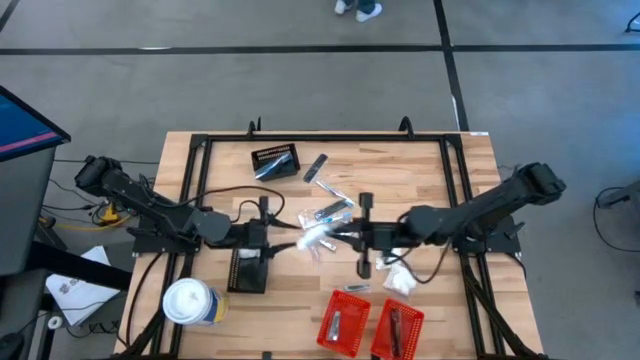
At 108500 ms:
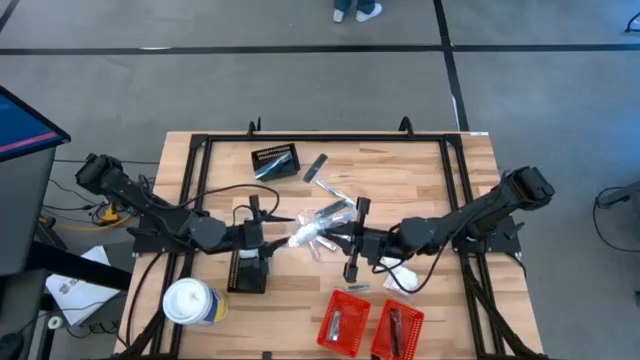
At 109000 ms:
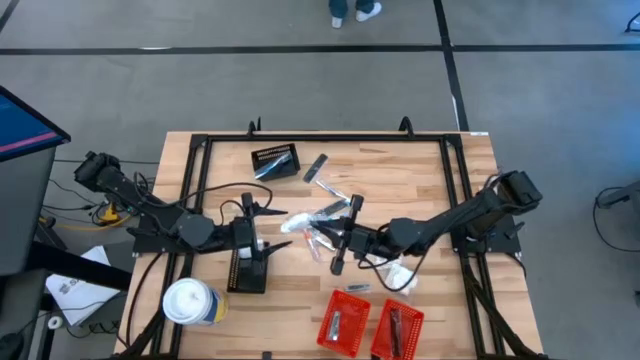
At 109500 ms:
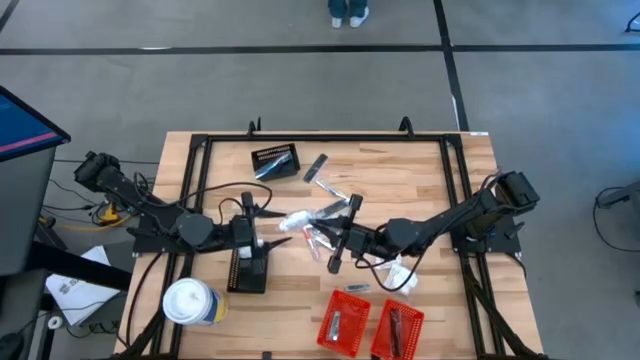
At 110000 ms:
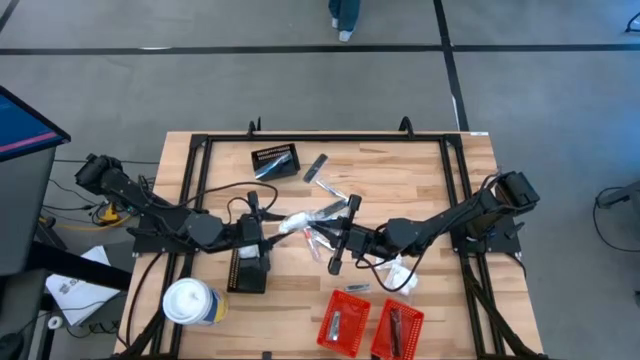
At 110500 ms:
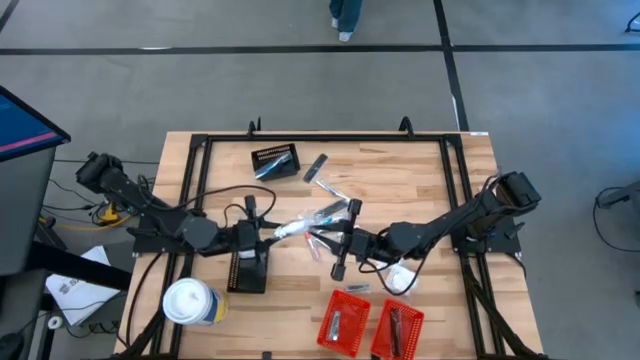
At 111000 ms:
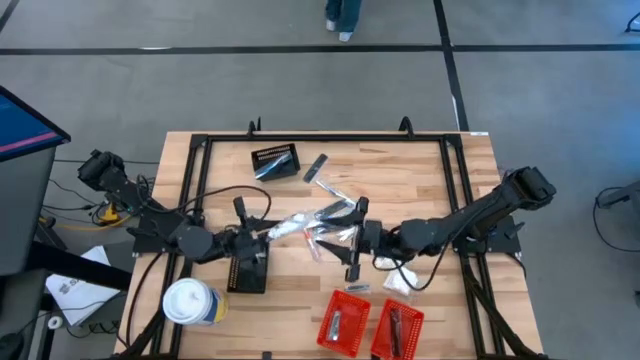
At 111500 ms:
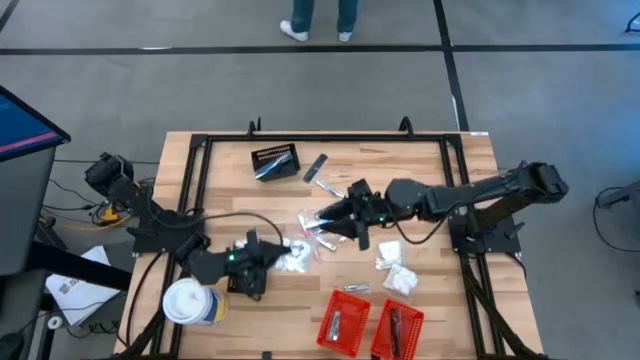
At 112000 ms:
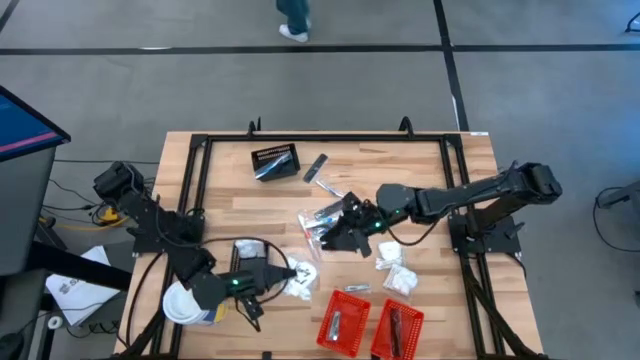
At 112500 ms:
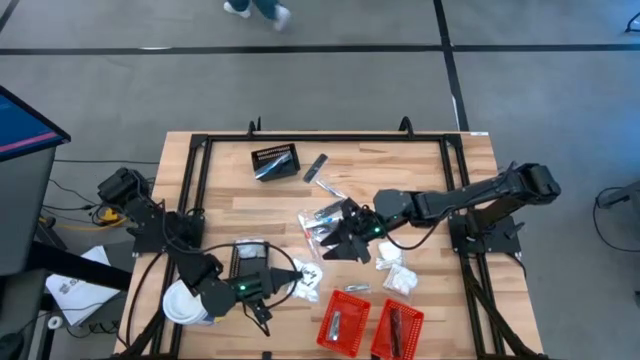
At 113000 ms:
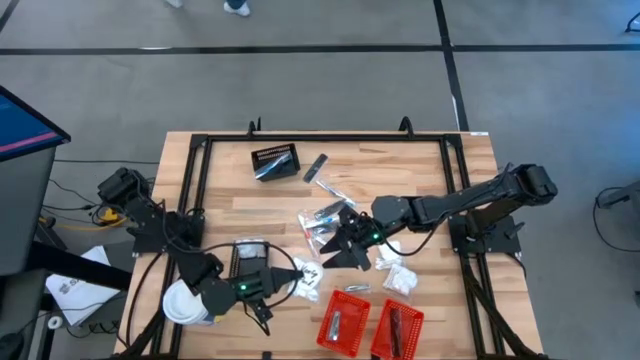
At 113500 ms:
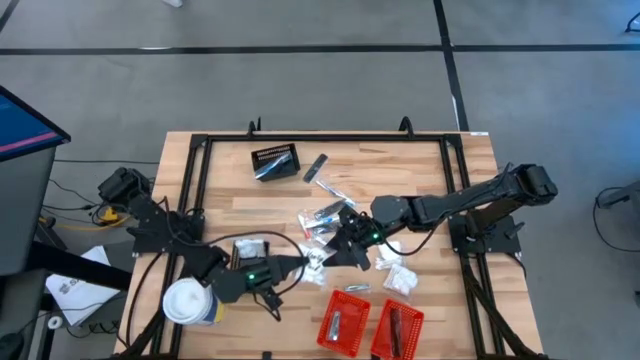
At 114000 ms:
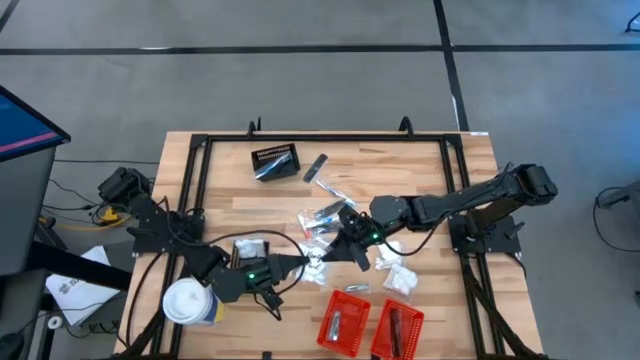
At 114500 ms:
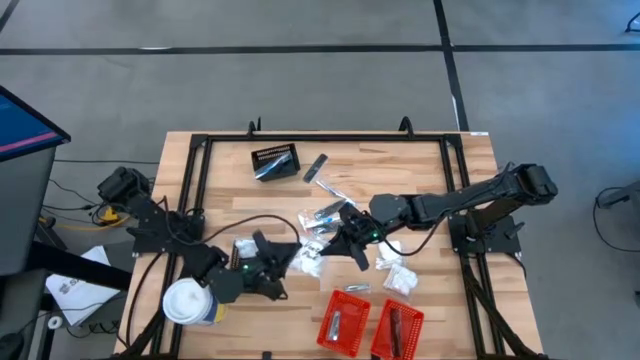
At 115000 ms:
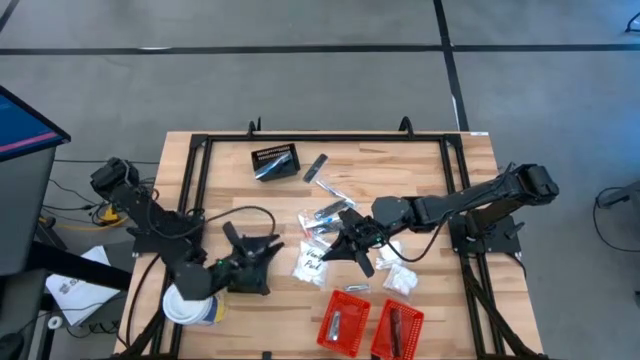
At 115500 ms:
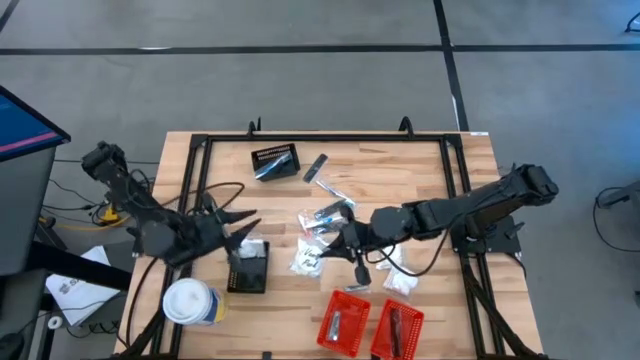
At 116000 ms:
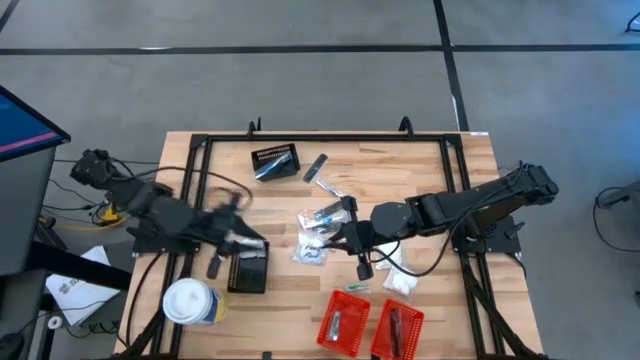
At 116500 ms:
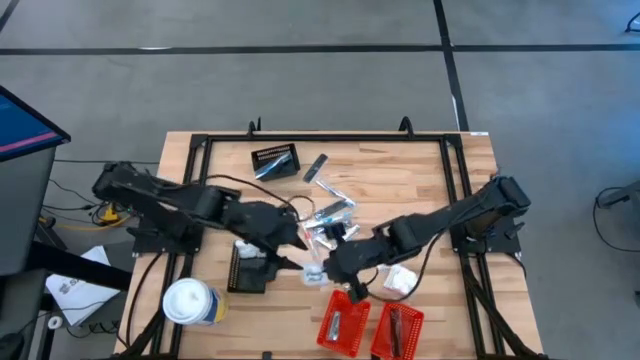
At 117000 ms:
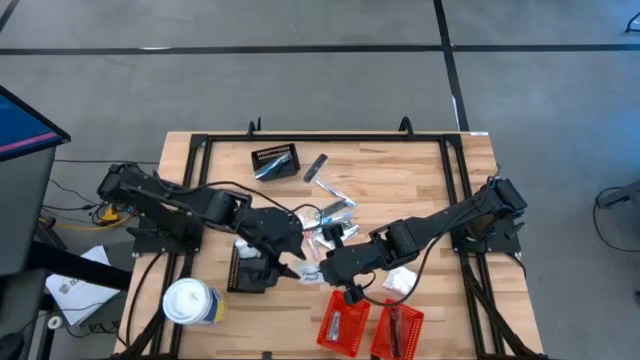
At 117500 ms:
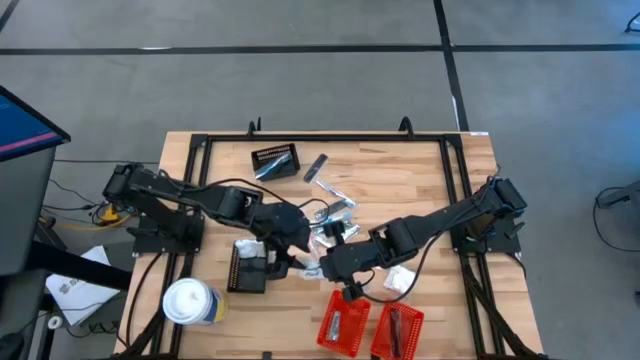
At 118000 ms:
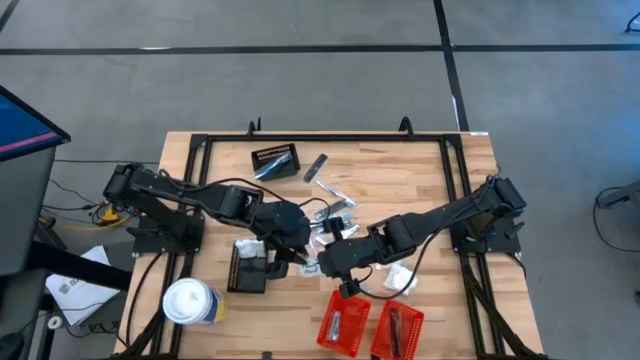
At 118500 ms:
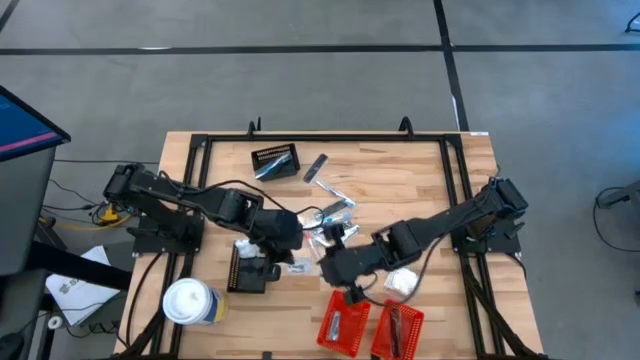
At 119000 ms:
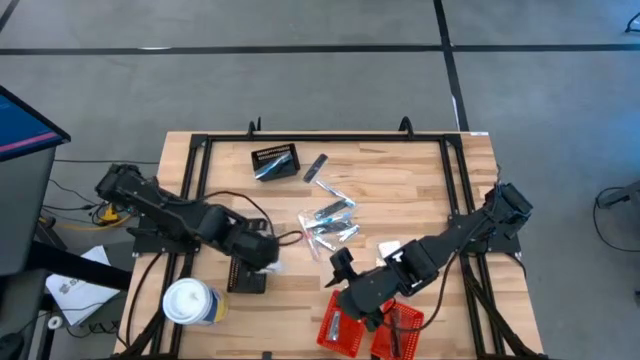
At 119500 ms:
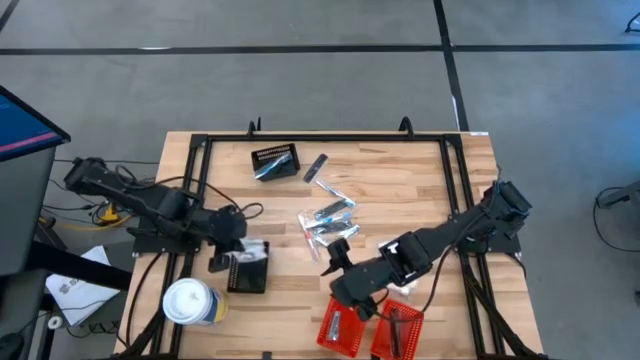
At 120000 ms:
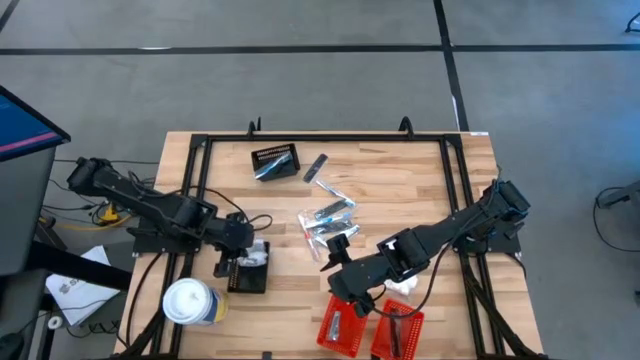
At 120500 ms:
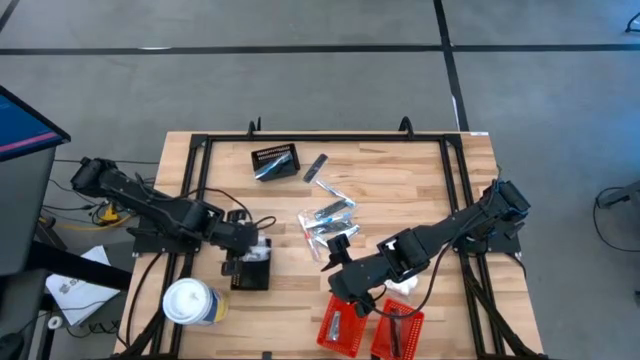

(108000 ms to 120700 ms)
Task: Pick & Place Travel size toiletries
Put the cotton pack into the bottom black bin

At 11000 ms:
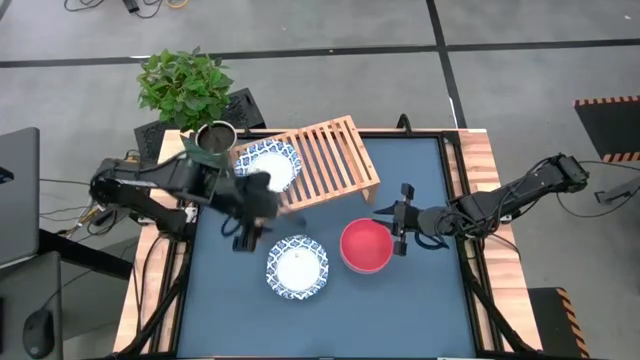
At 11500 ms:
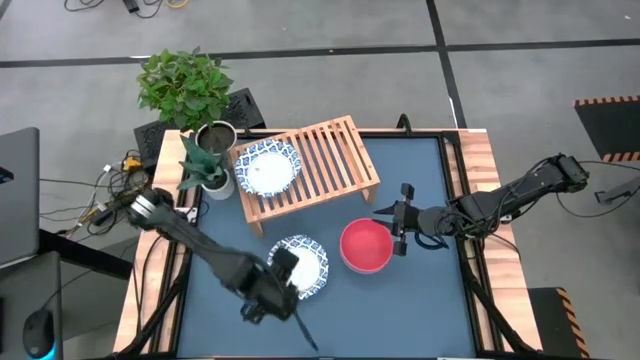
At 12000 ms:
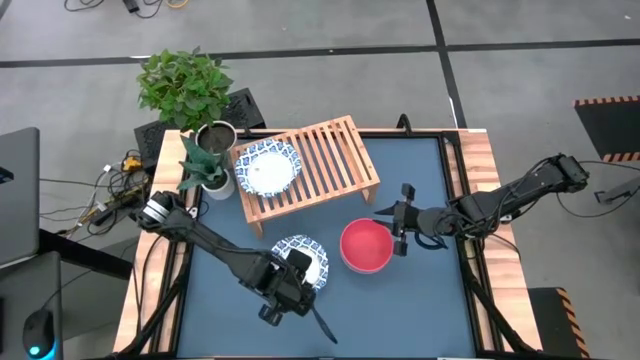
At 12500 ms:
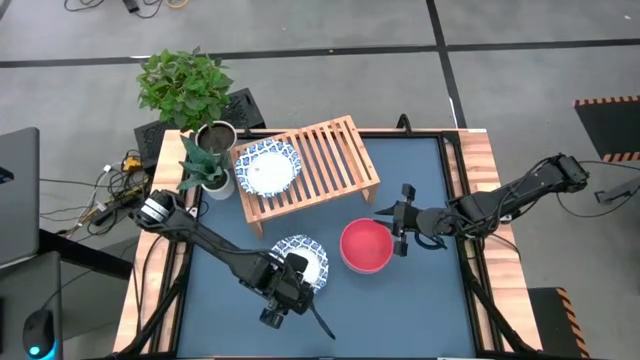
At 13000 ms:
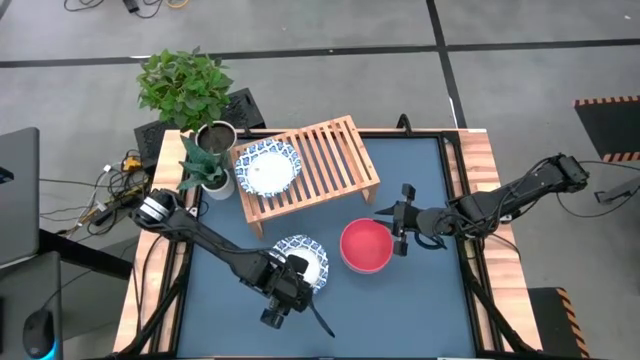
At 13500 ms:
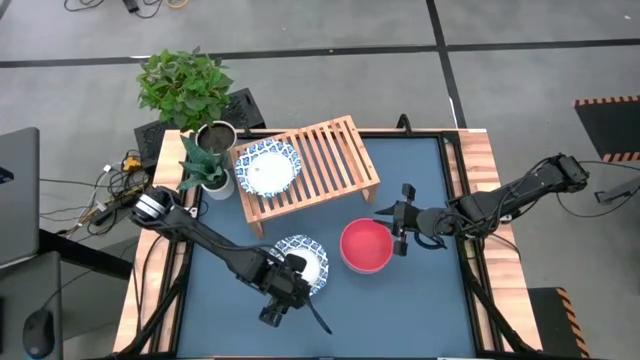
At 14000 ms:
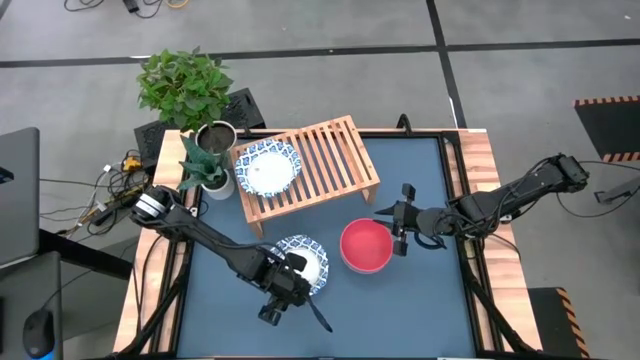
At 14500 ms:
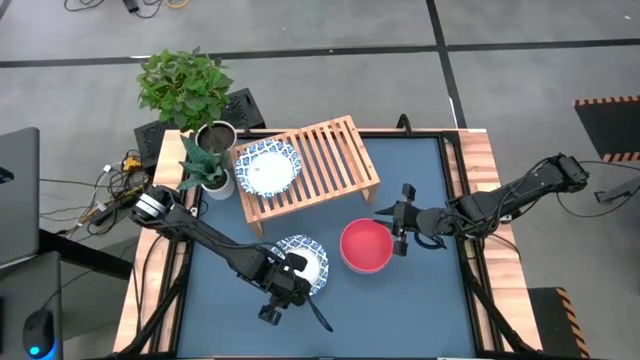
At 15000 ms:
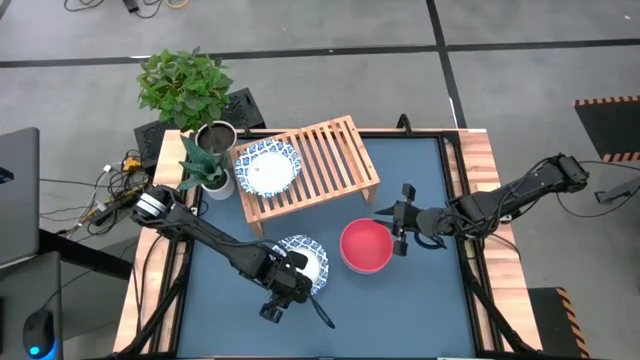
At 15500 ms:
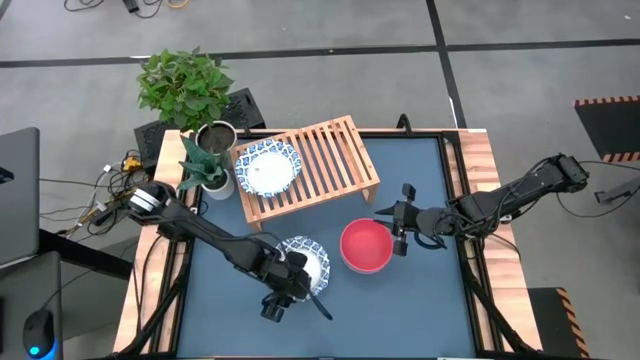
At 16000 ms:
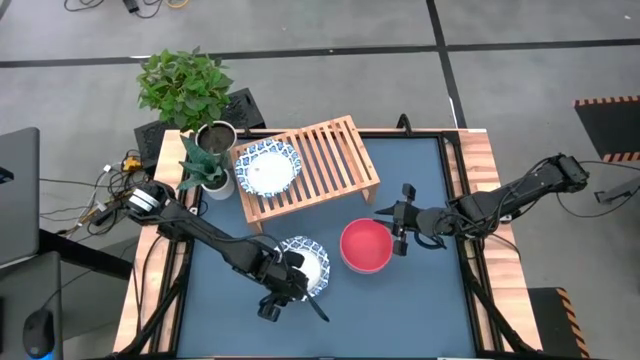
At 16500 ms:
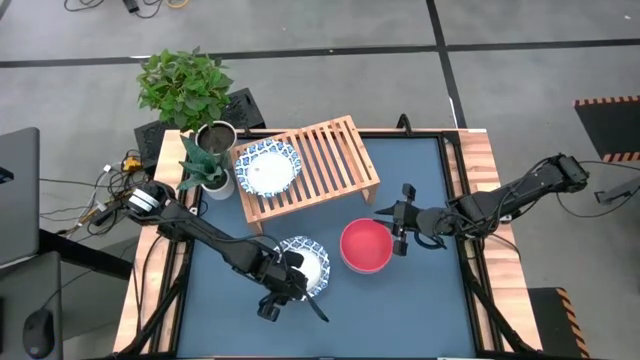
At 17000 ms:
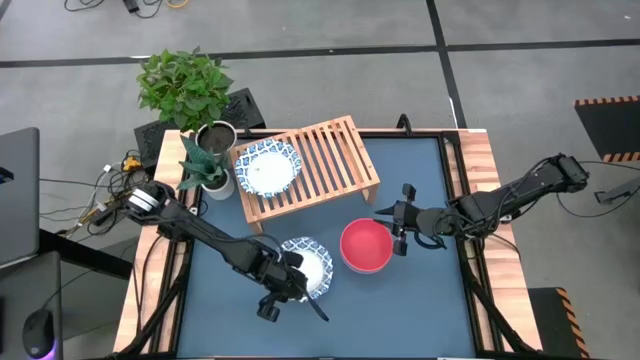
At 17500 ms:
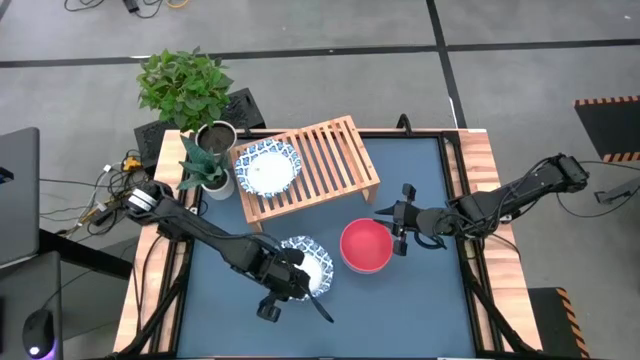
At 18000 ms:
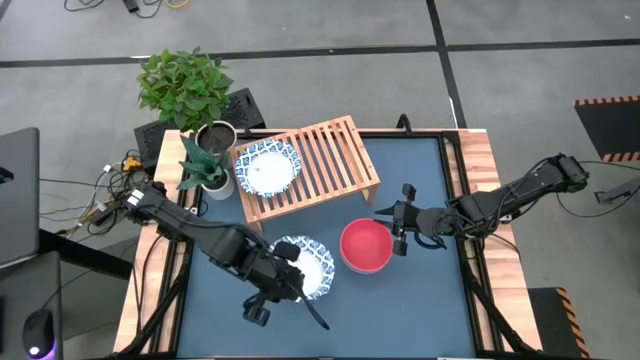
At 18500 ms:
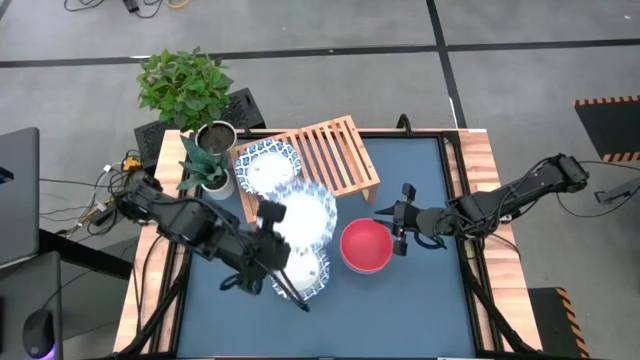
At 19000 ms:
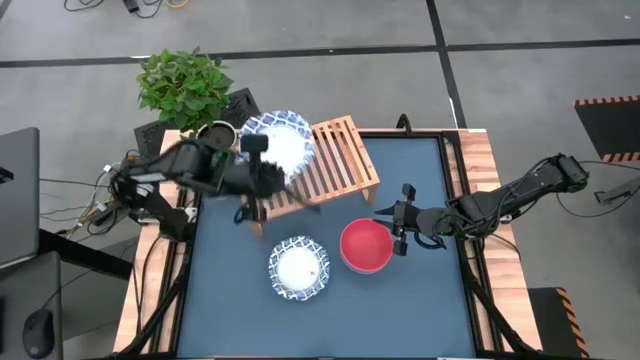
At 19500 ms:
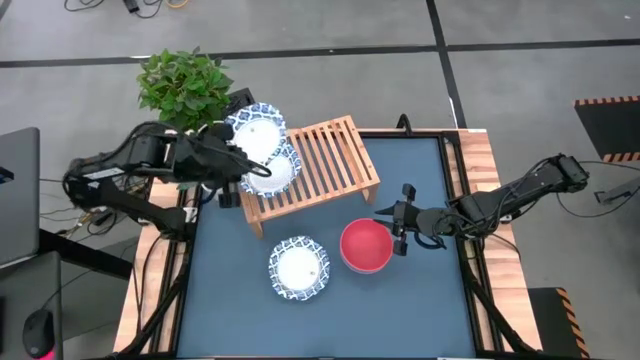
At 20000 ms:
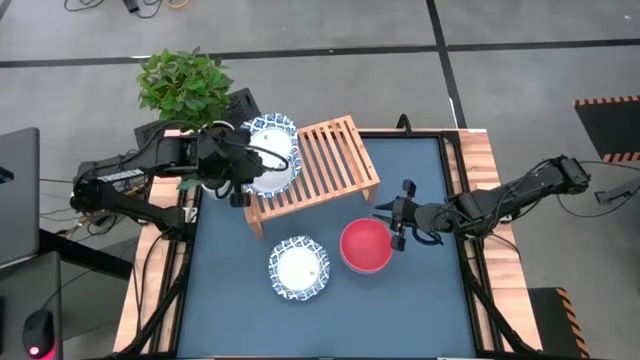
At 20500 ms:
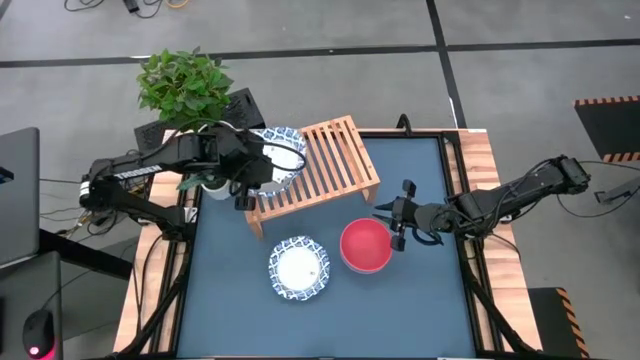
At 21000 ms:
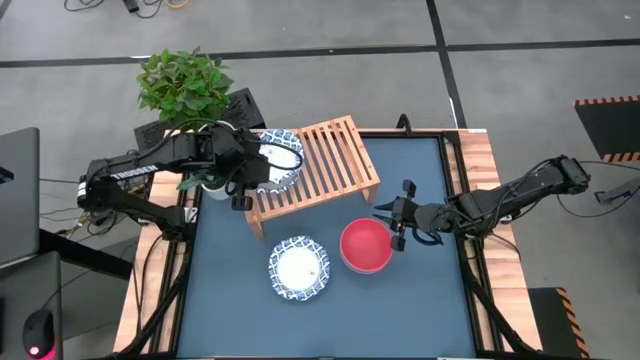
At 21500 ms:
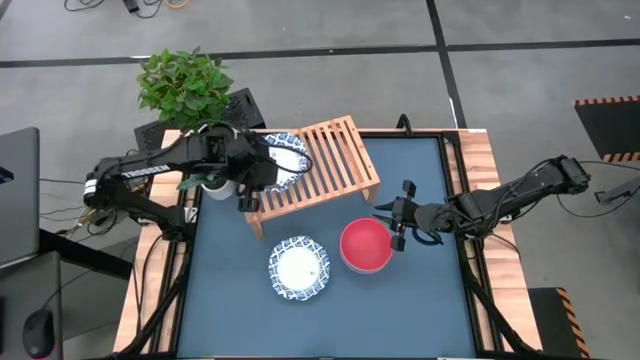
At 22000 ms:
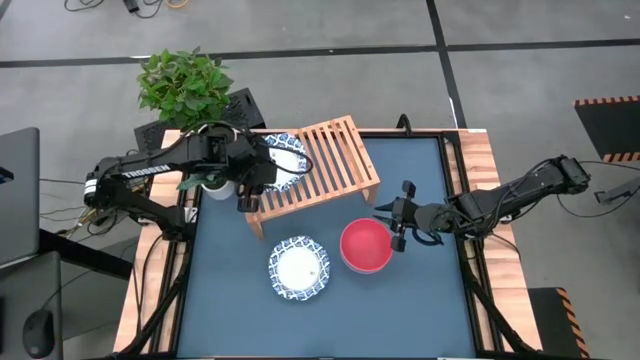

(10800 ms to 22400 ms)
Task: Place and stack bowls onto a shelf
Stack the blue patterned bowl on top of the blue patterned bowl on the shelf
